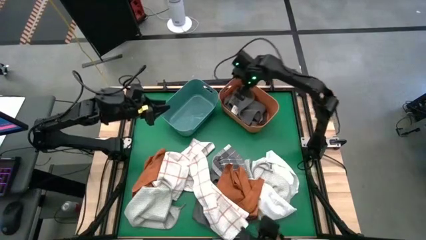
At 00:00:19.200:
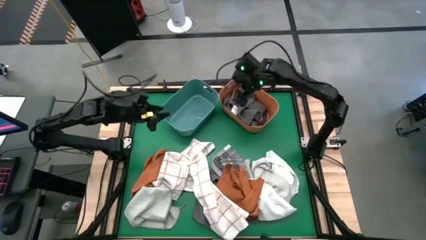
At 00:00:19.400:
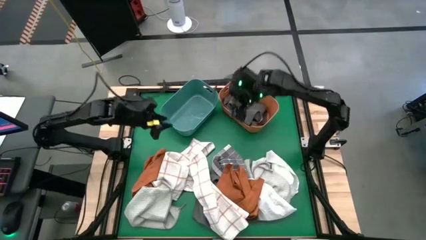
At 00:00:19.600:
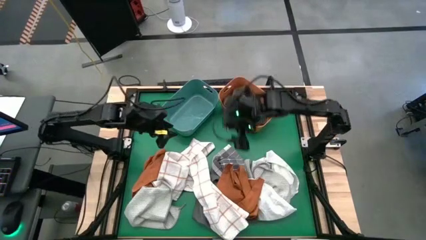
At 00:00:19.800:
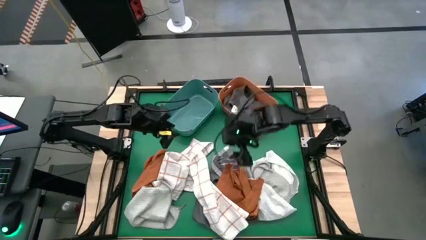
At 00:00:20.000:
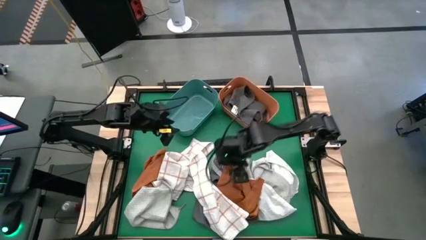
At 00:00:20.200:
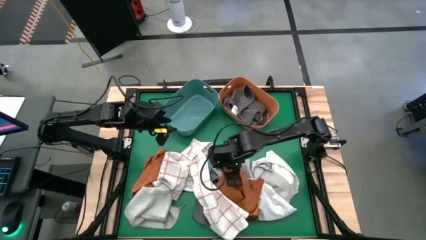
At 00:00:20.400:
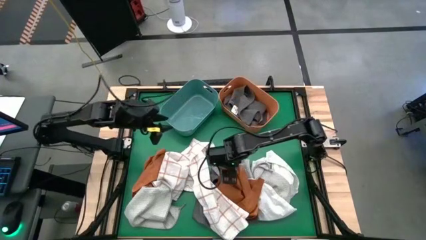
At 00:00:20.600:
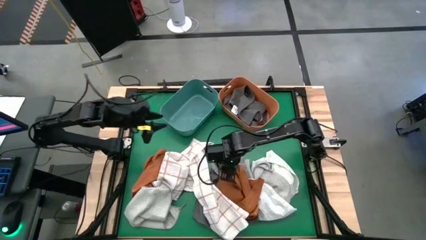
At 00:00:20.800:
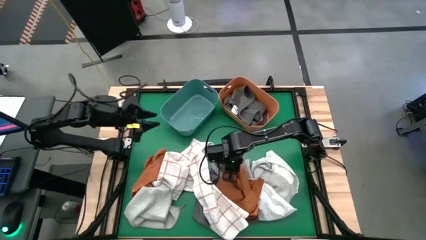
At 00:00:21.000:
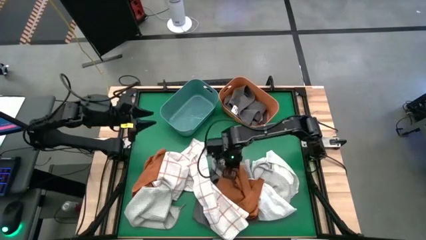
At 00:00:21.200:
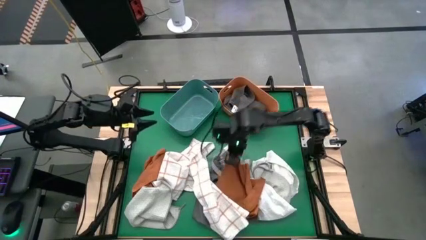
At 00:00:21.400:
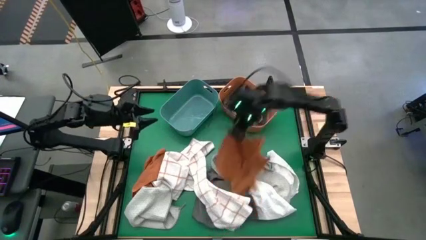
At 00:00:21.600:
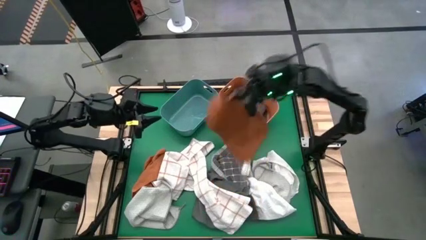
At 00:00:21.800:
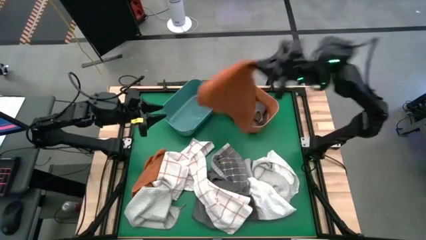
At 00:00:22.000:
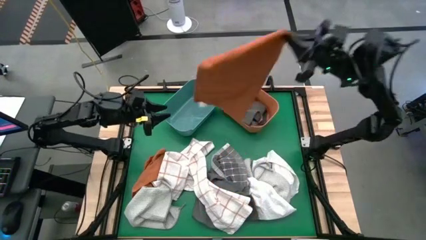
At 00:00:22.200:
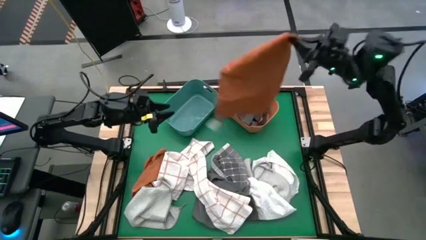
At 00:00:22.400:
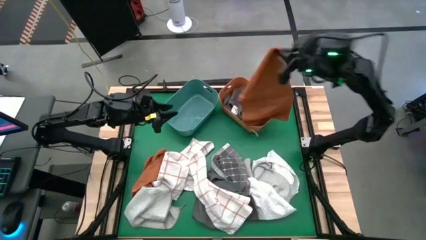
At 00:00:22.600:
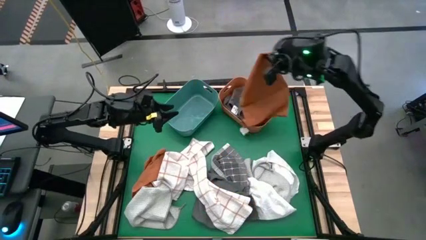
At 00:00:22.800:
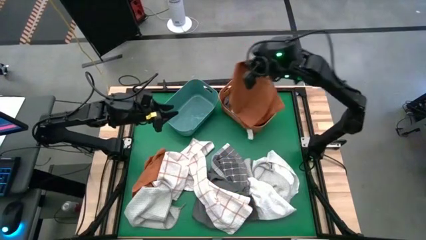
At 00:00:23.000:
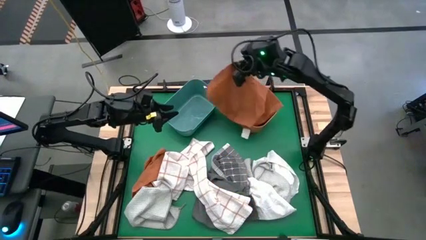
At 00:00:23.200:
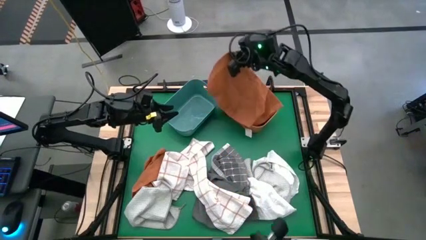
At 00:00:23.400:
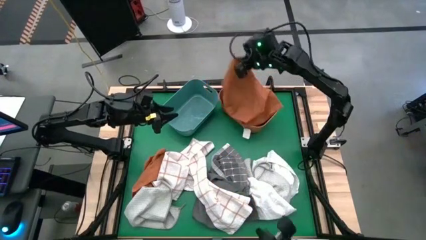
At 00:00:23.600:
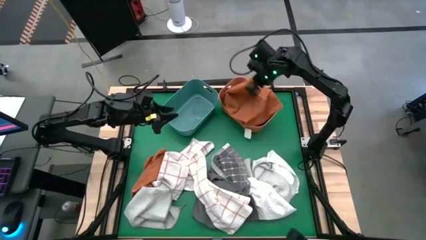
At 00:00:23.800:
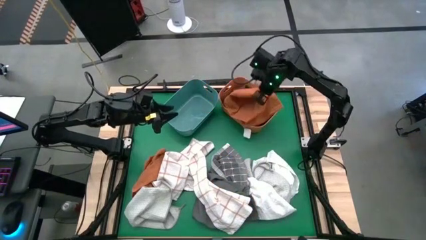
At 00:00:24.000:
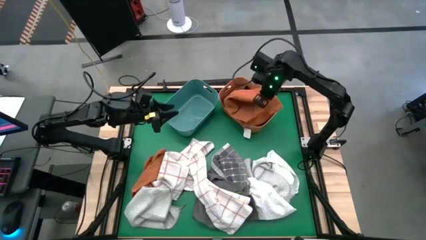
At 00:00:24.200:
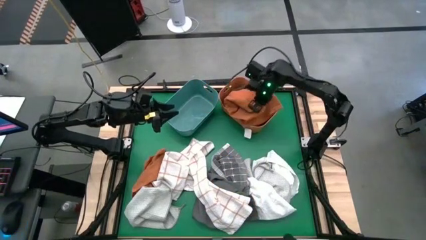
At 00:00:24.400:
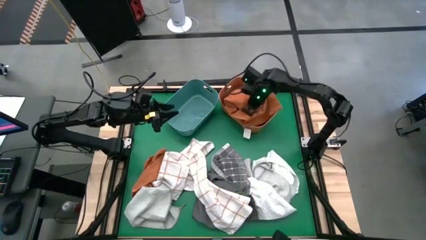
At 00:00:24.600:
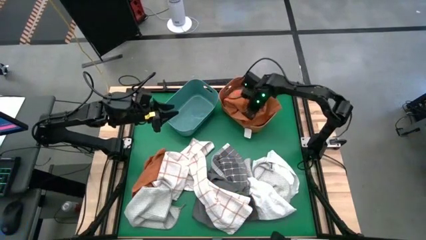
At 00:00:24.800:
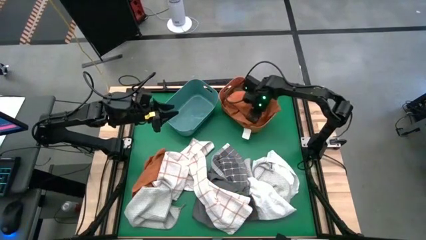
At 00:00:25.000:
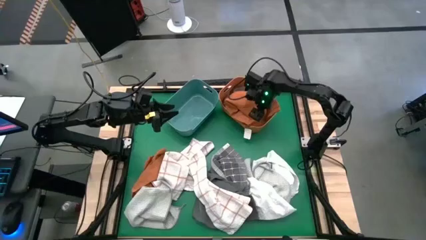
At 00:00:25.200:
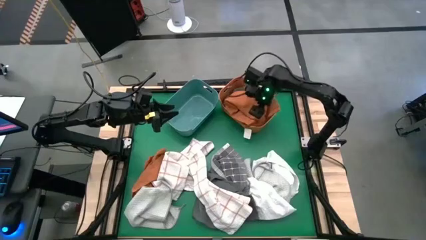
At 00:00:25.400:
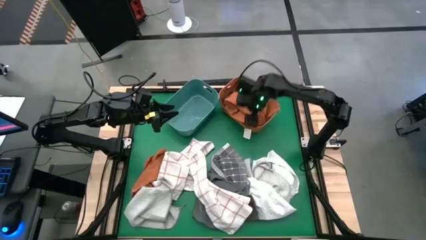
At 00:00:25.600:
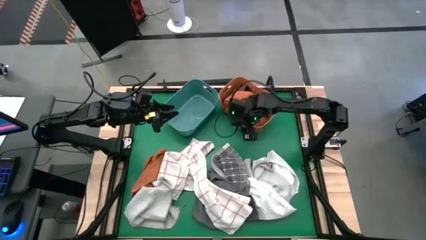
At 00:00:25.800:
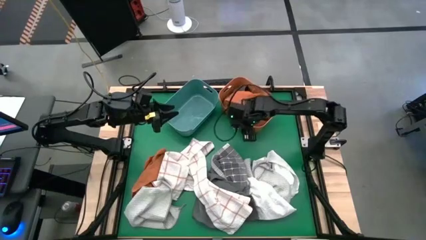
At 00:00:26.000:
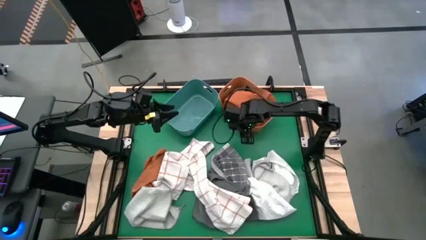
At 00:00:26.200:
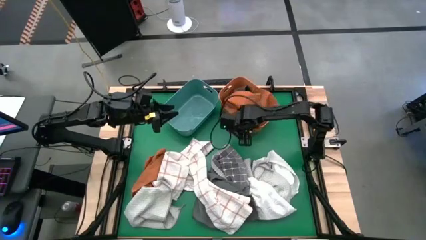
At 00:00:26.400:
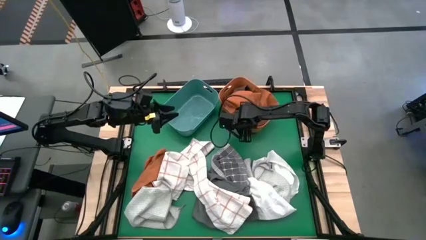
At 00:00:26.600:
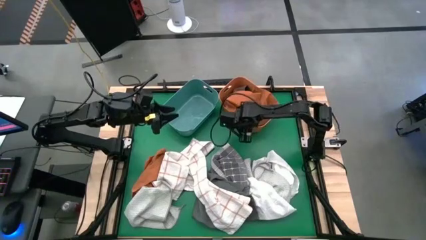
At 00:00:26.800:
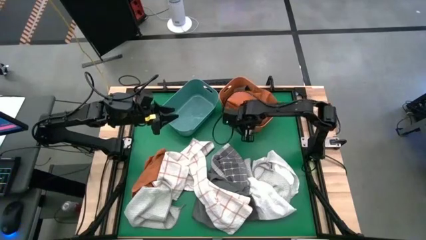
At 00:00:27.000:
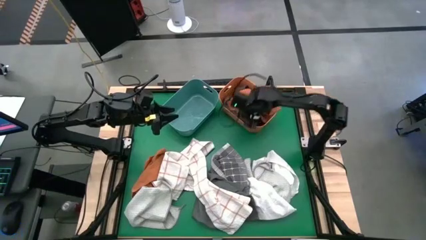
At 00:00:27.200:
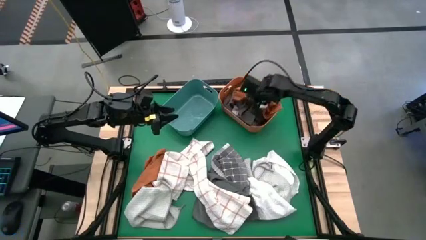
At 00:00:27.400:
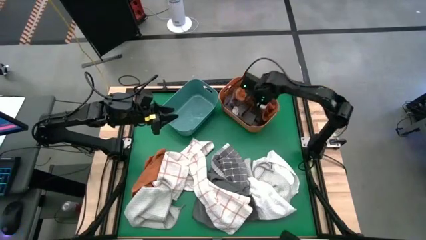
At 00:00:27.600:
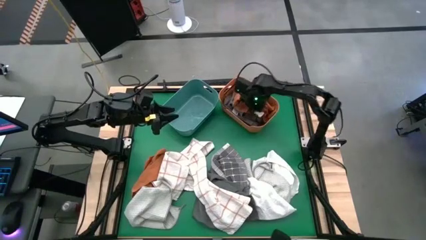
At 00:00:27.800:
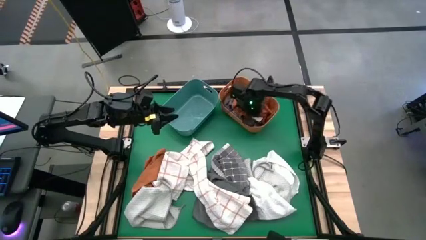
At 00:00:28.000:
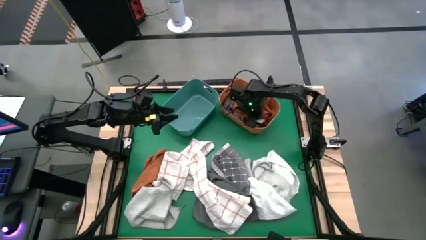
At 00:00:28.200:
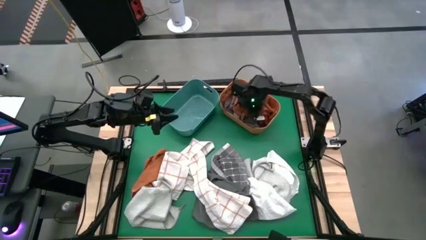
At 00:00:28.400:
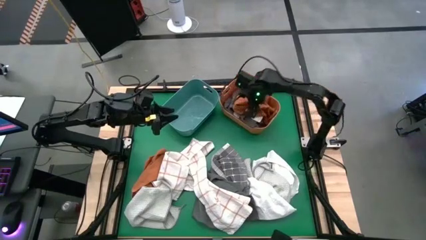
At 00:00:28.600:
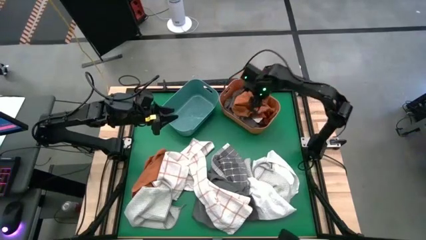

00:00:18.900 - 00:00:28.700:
Task: Sort towels by color in basket
Put the orange towel into the orange bin
